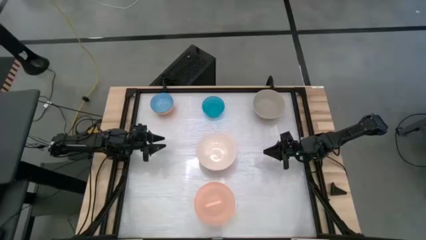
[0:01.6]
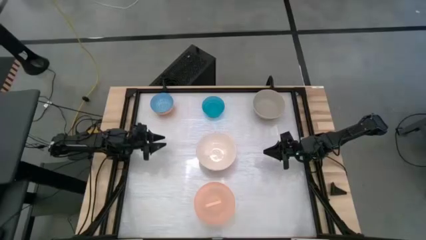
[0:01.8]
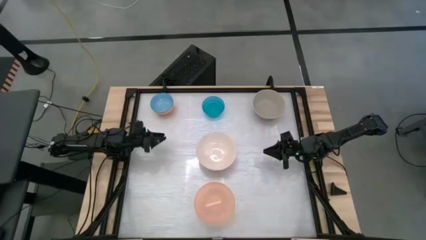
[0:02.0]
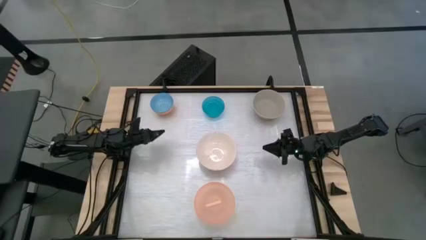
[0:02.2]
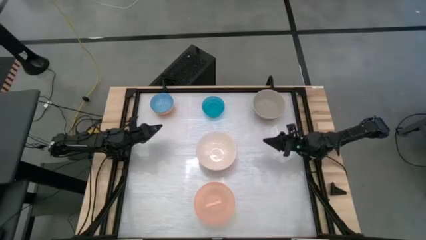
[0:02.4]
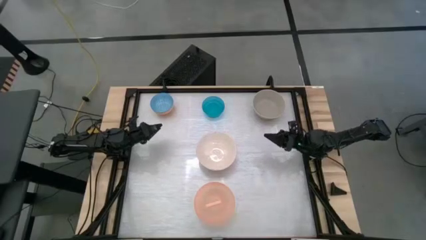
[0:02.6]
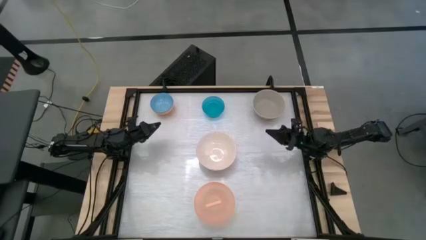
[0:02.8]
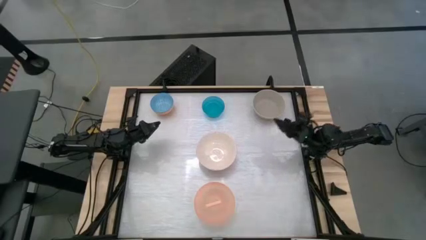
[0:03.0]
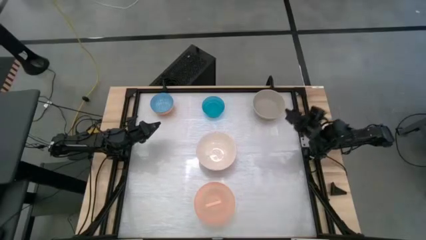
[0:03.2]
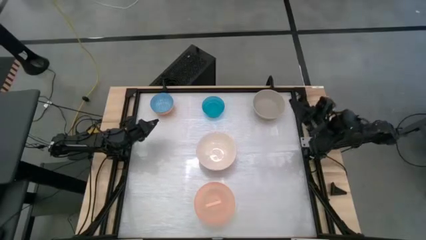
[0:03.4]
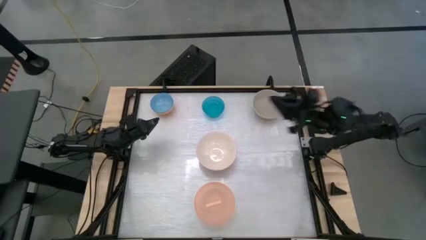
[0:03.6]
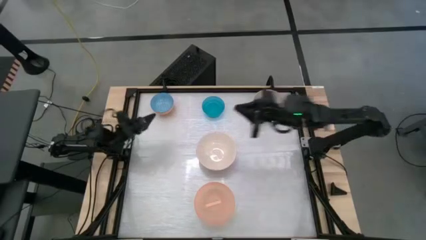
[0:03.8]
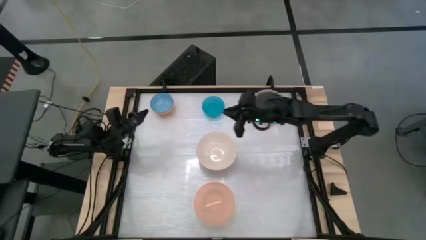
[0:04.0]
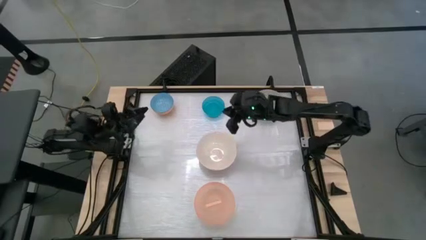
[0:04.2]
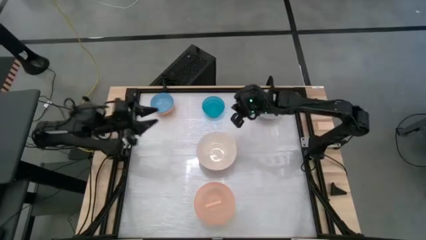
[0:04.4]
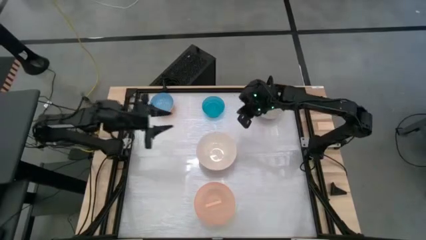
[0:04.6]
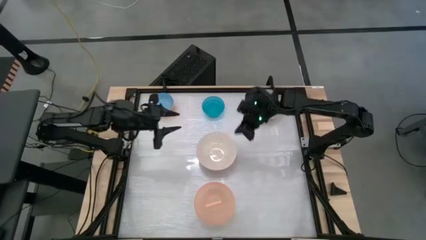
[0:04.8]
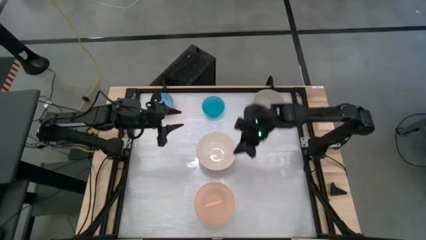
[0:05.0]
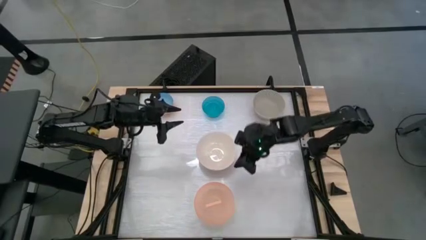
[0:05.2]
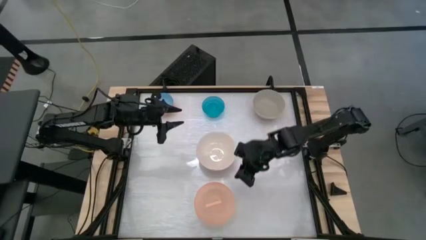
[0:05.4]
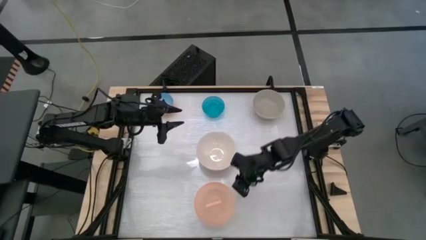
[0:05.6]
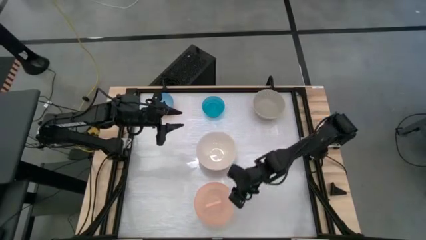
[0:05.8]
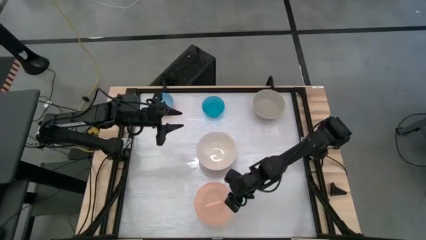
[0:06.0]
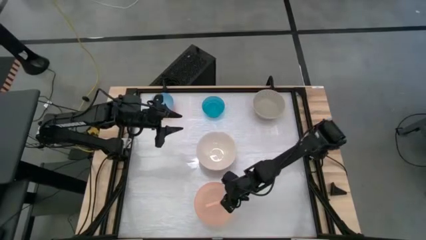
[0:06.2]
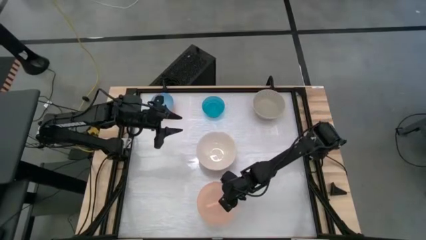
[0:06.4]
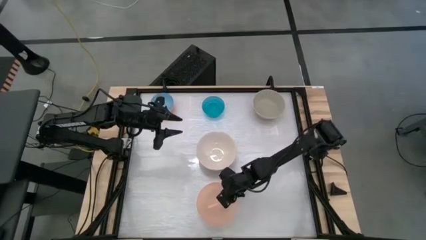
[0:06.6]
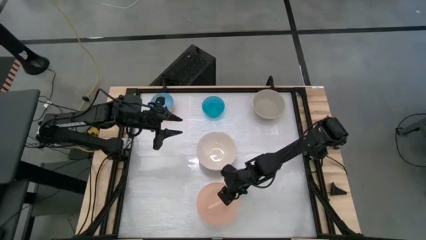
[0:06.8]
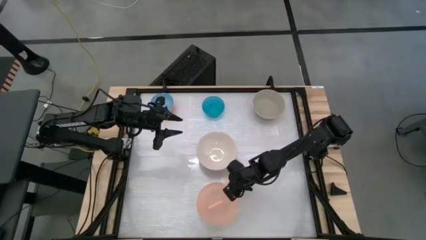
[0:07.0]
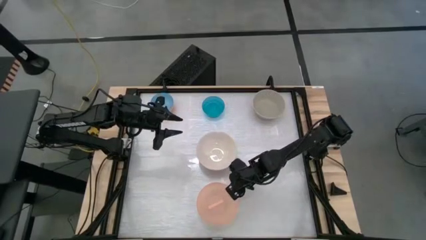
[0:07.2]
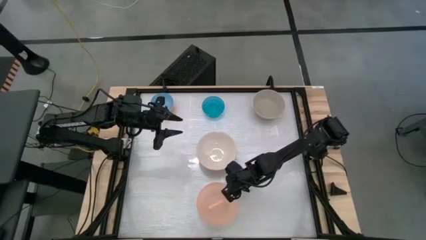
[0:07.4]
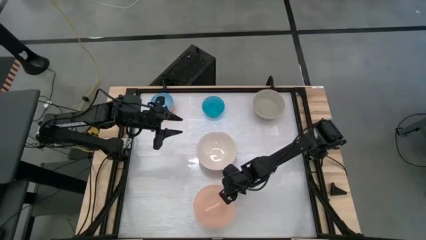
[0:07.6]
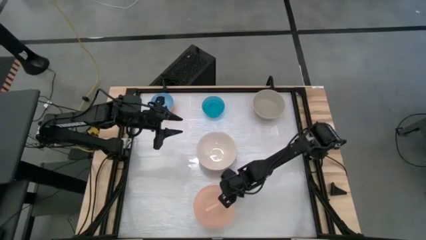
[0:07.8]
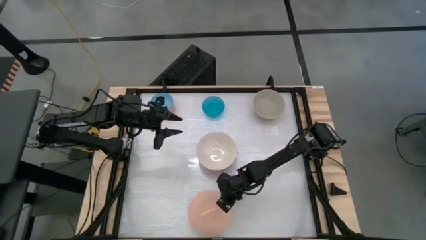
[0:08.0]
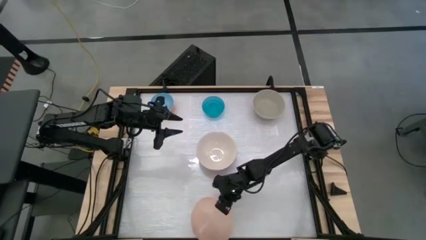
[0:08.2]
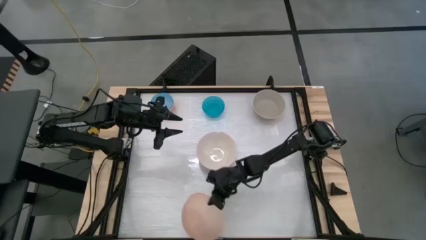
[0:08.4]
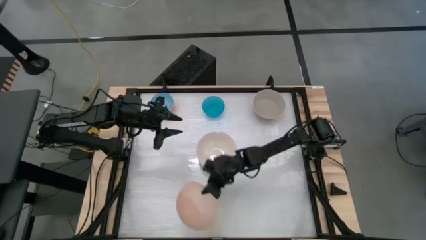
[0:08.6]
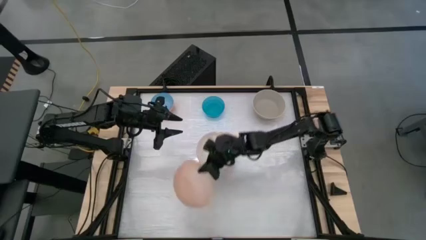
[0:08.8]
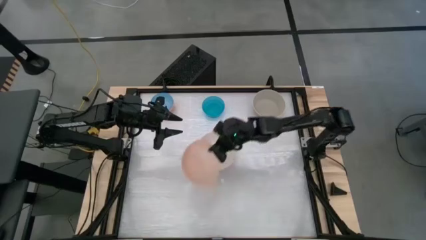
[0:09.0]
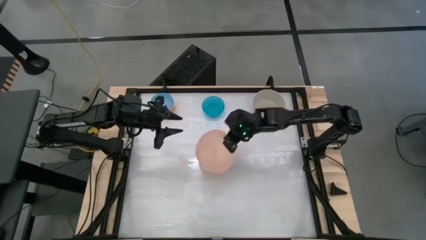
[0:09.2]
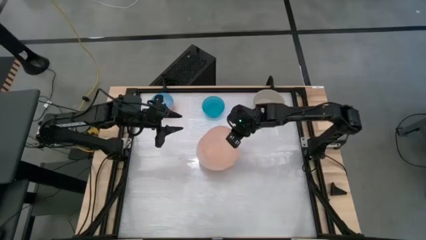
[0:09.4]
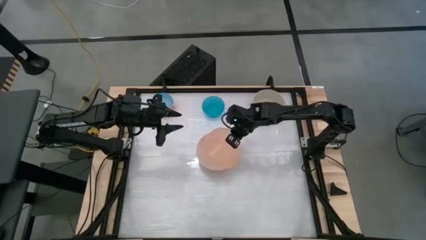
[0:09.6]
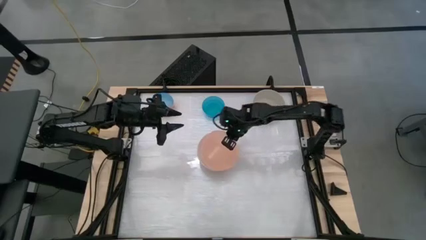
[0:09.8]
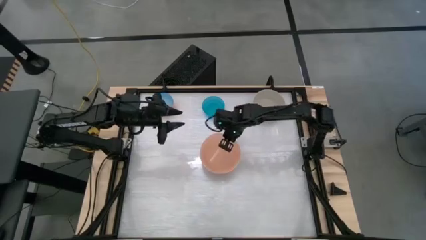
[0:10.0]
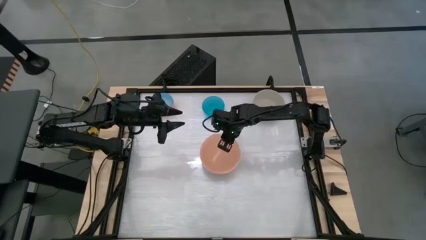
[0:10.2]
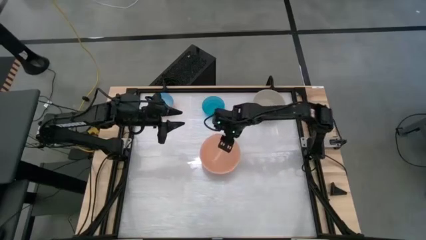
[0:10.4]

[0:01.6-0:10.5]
Stack the orange transparent bowl on top of the white bowl

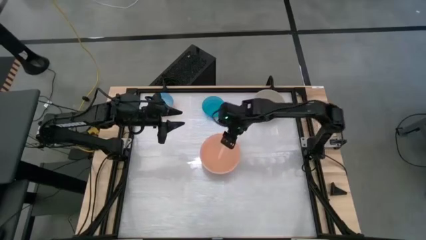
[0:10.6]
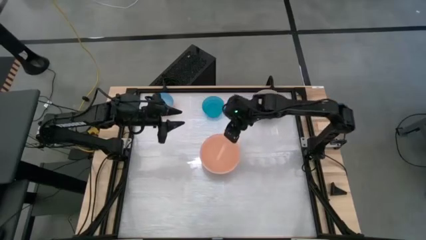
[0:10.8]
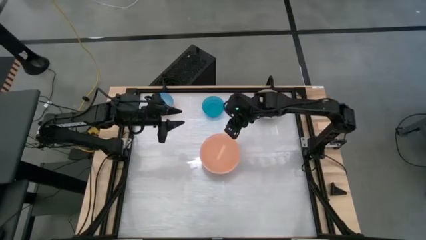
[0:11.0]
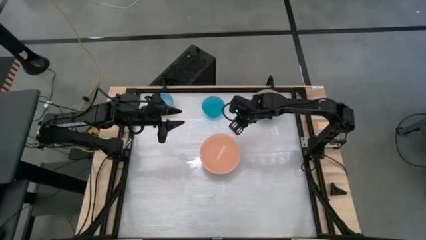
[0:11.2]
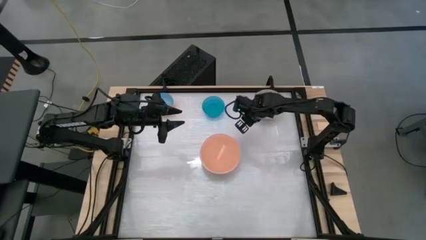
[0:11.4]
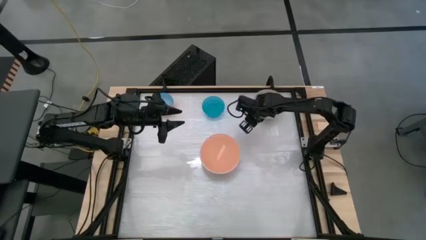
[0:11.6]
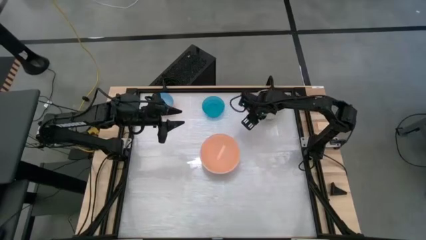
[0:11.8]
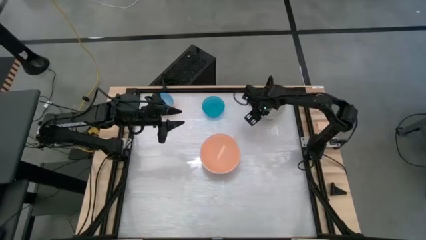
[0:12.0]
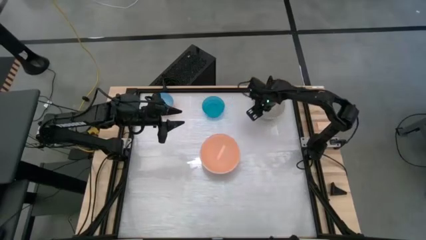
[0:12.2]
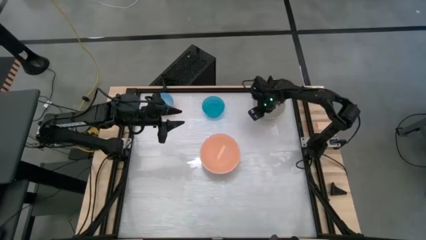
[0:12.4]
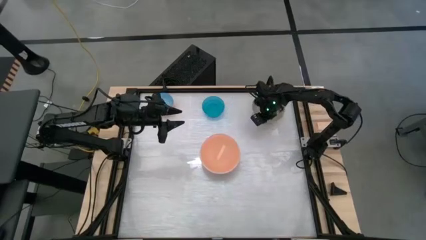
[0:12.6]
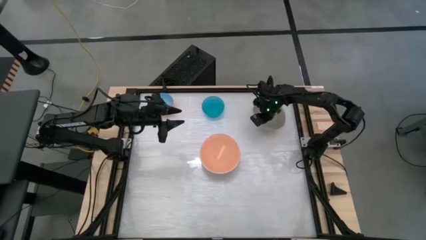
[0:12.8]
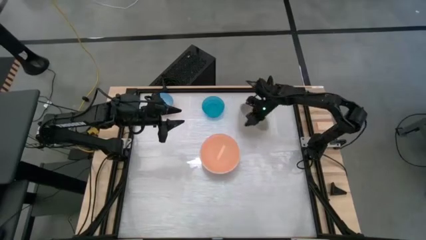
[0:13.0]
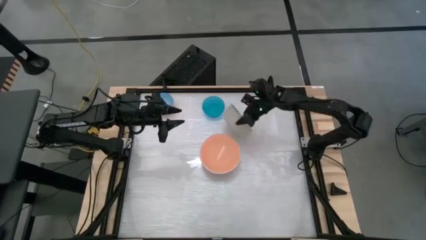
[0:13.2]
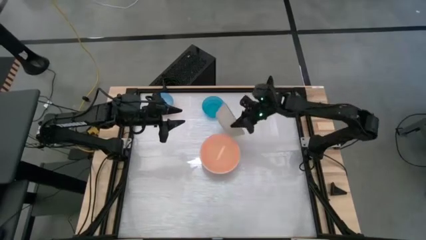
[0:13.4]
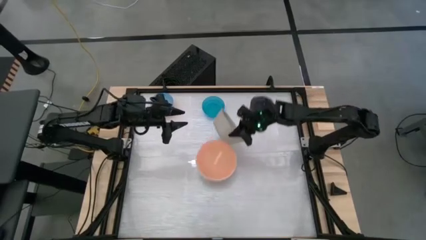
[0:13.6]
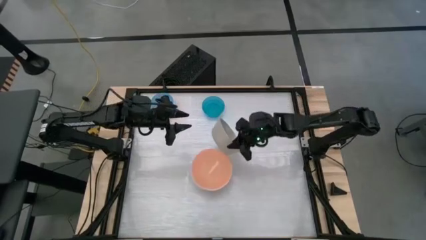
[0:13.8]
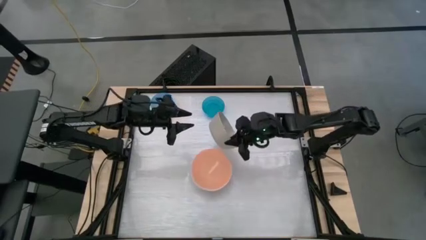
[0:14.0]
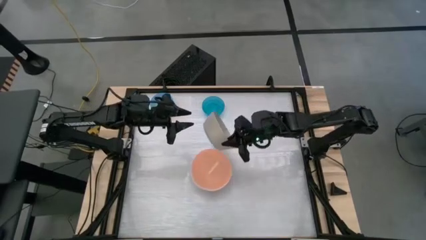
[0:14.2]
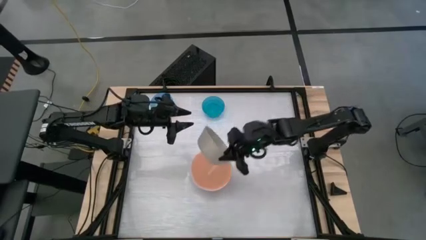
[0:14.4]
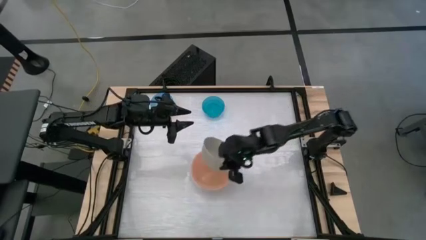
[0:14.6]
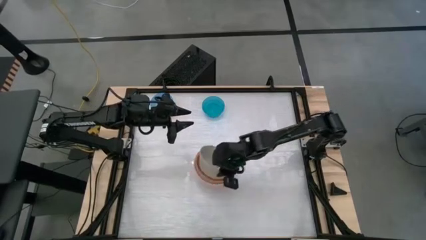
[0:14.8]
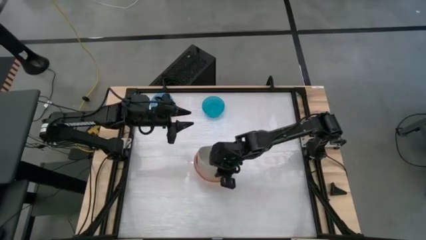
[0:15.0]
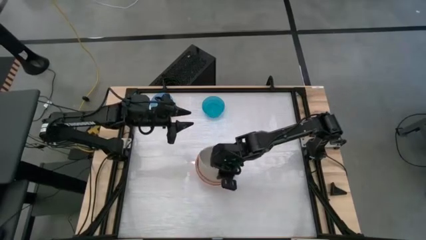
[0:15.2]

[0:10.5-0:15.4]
Stack the gray bowl on top of the orange transparent bowl
